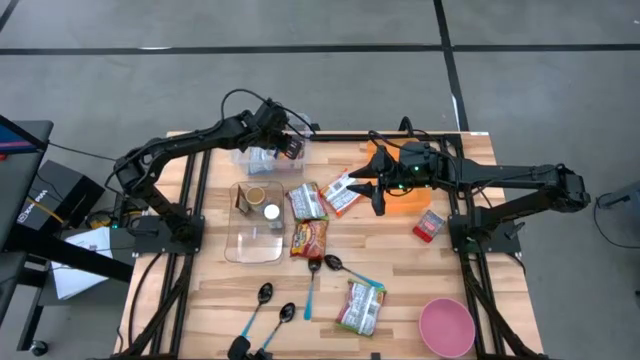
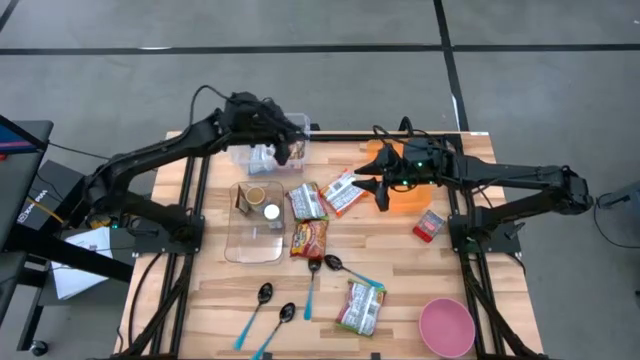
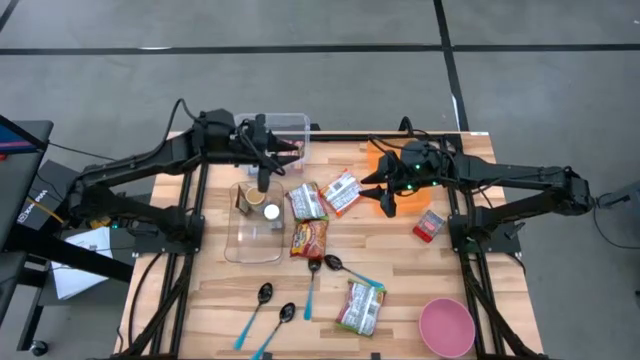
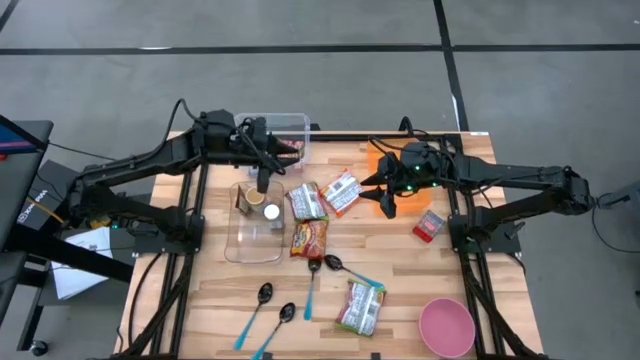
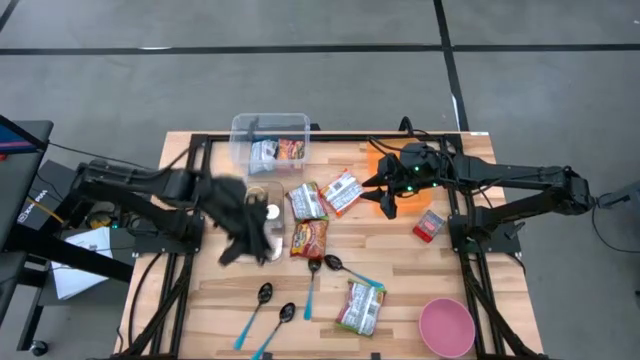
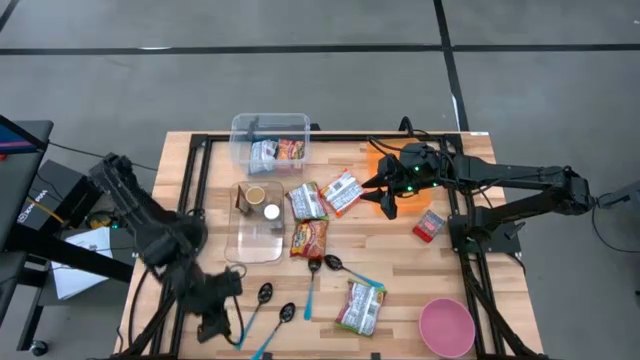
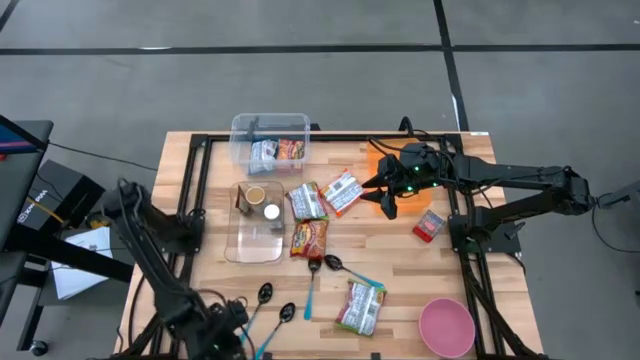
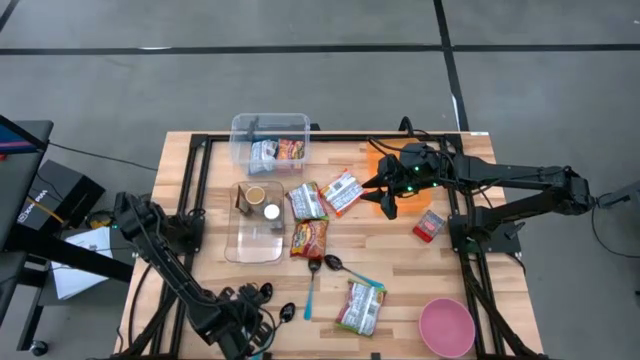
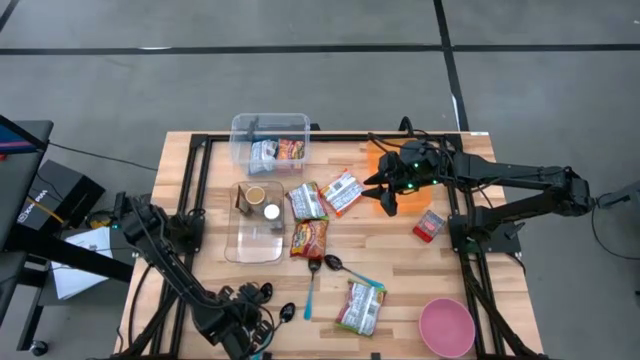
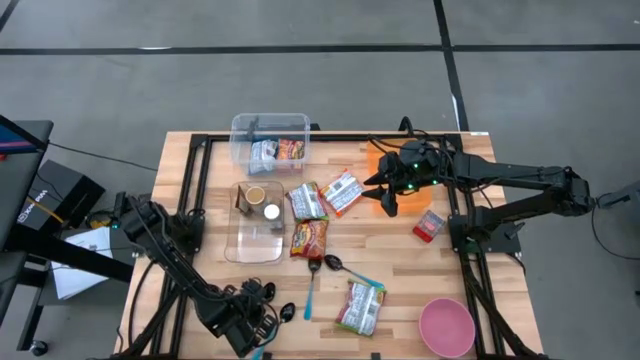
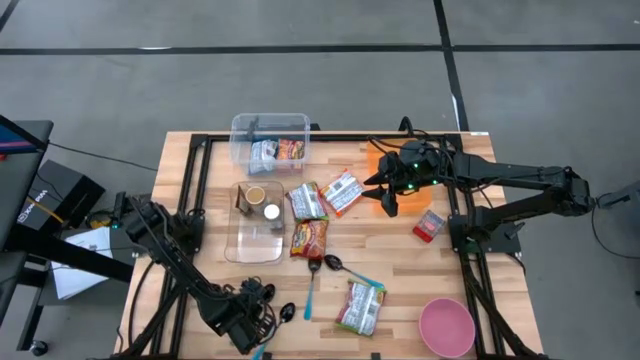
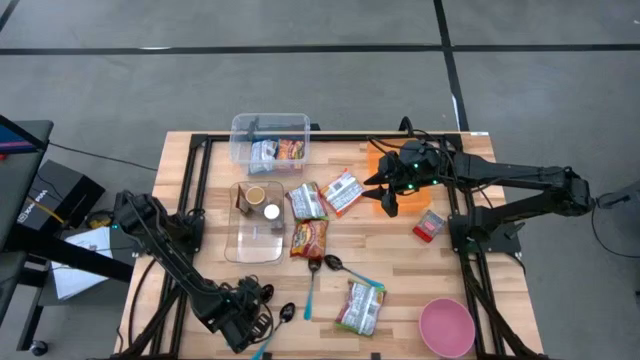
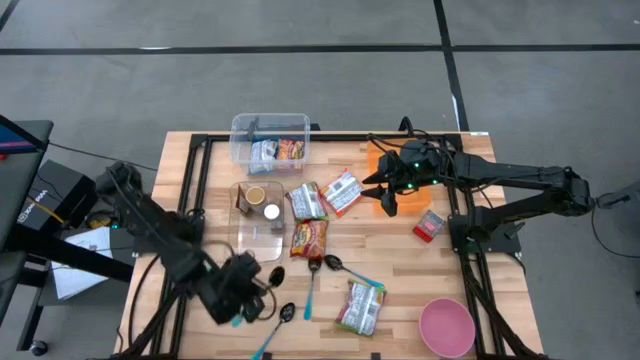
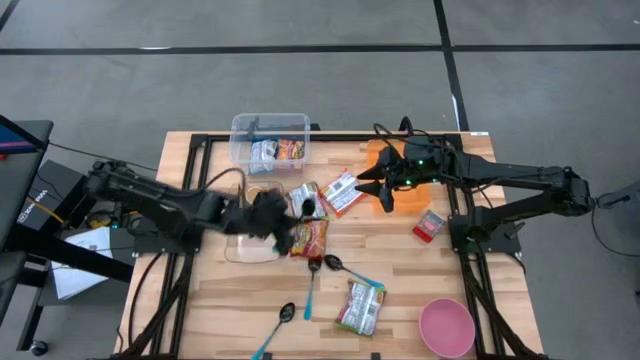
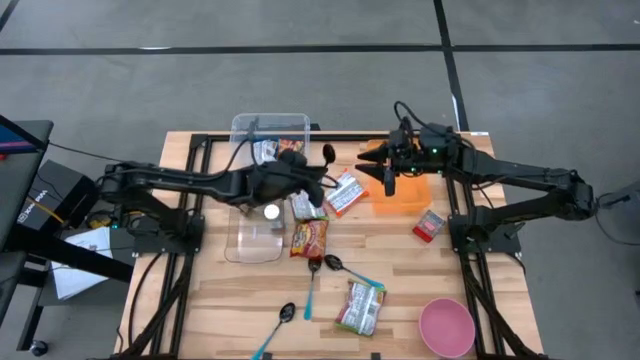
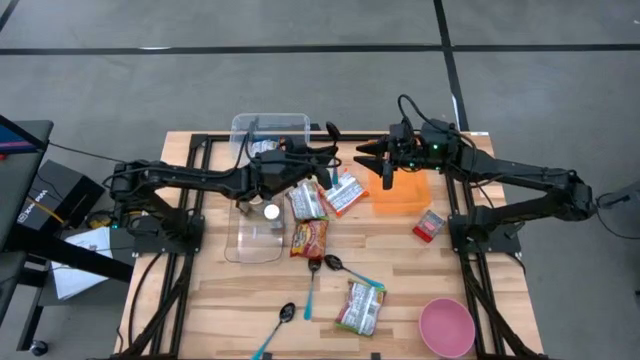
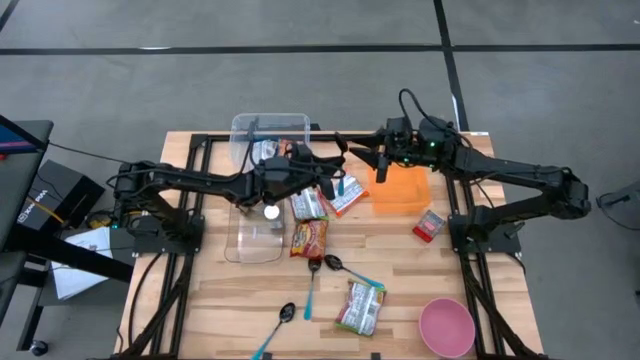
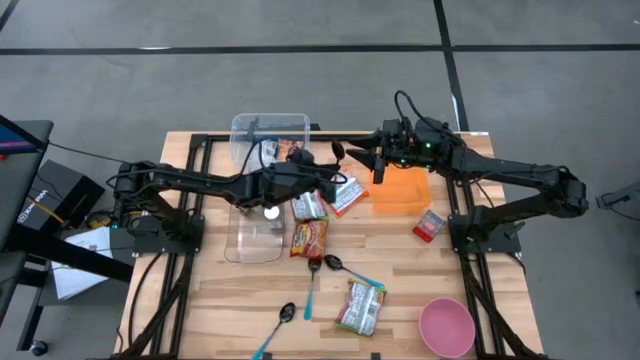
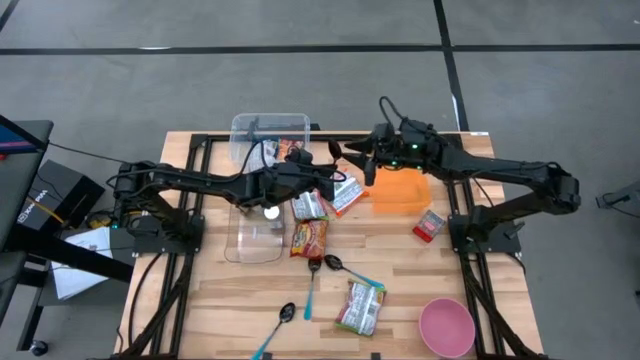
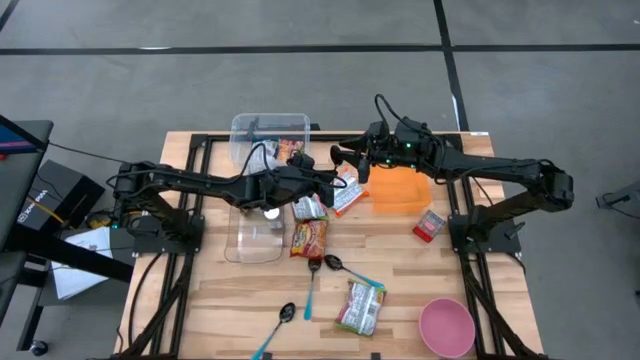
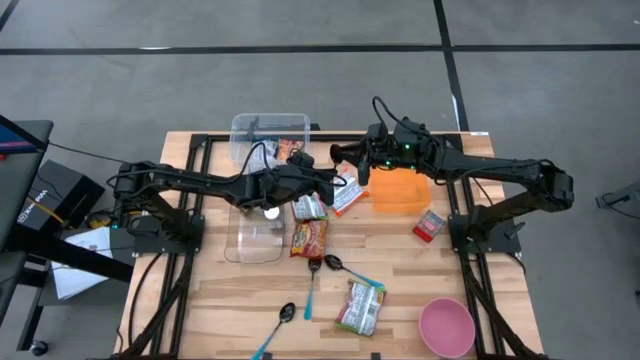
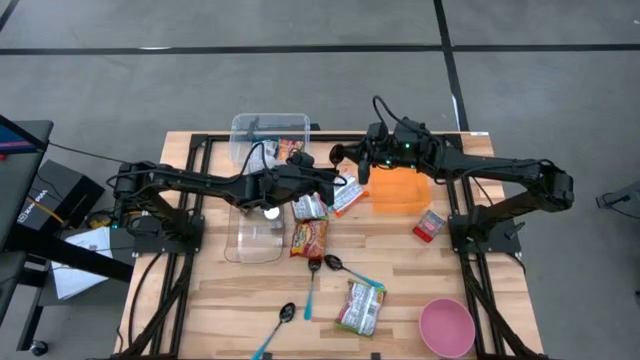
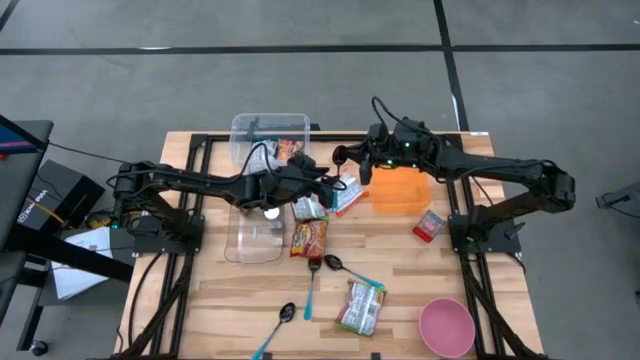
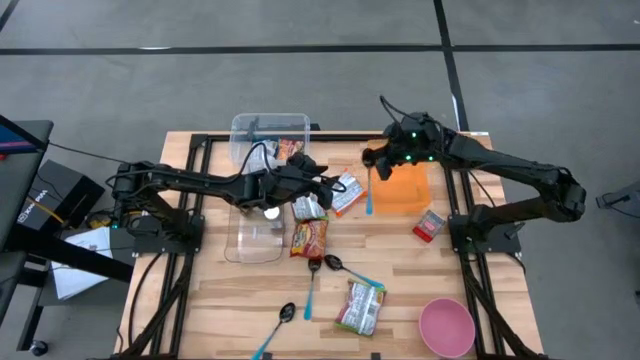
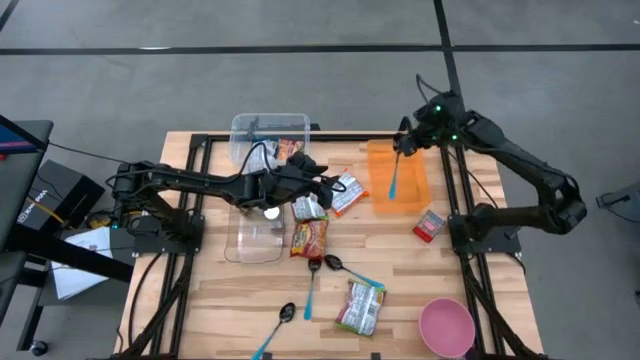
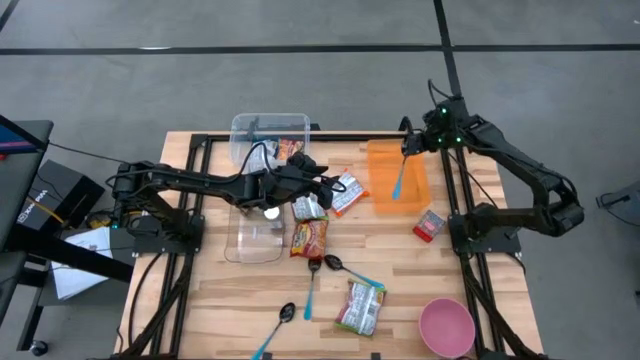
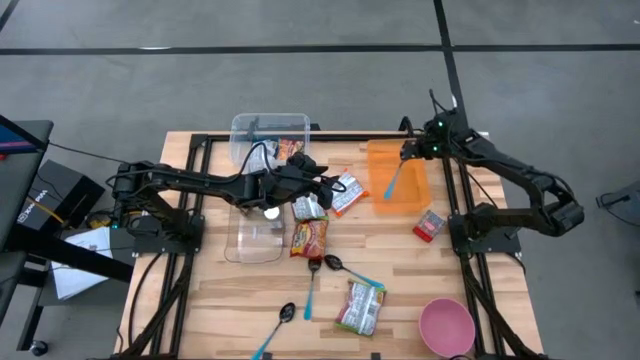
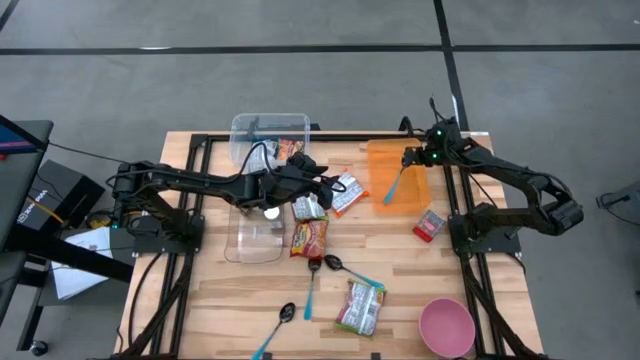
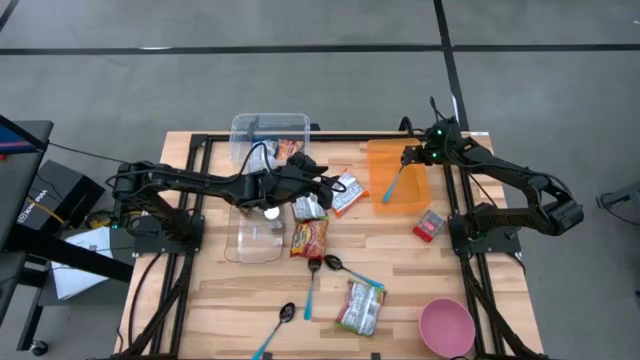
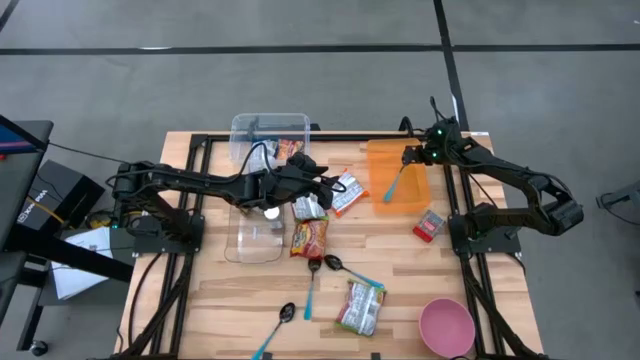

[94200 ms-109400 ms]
Task: Pick & Place Food Item
Put the blue spoon into the orange container
